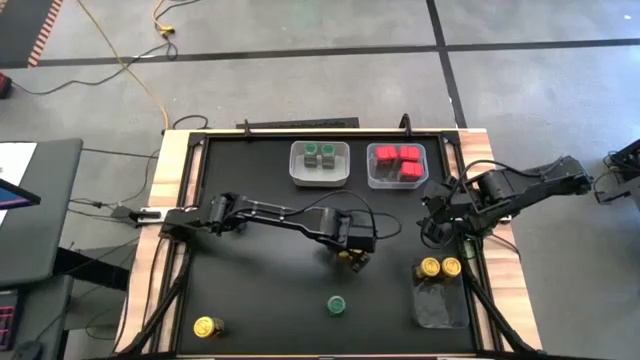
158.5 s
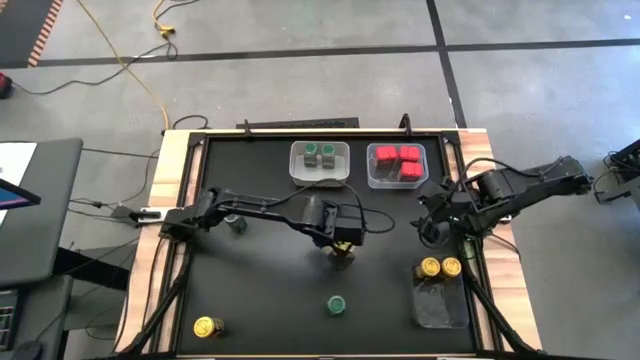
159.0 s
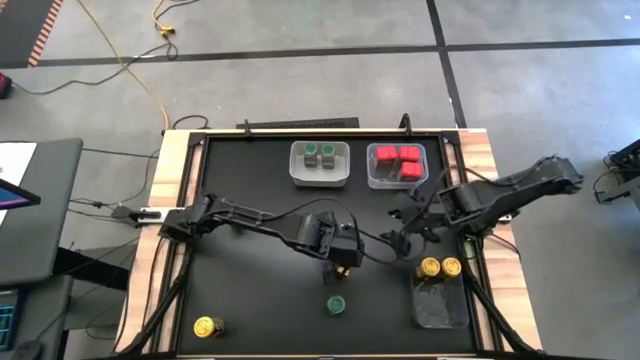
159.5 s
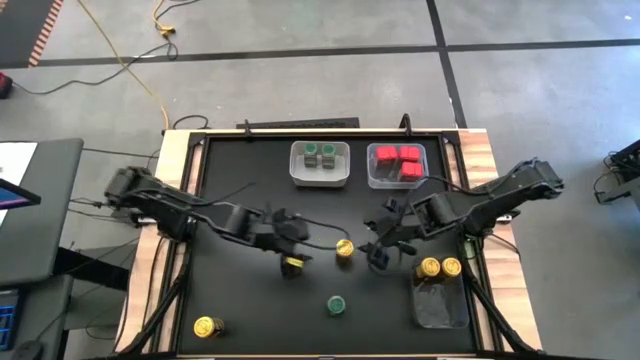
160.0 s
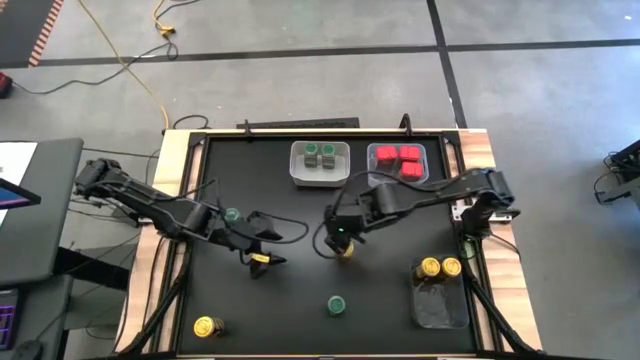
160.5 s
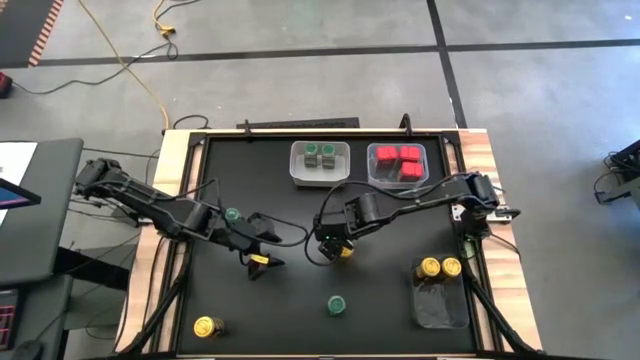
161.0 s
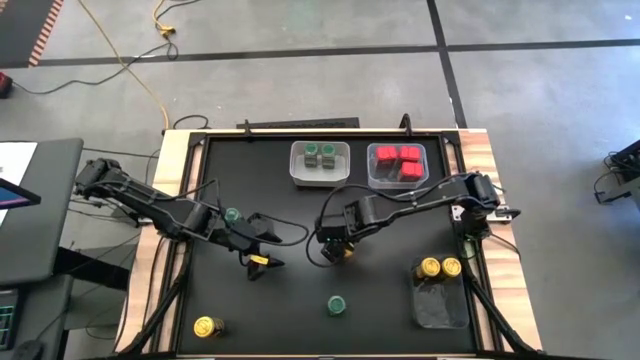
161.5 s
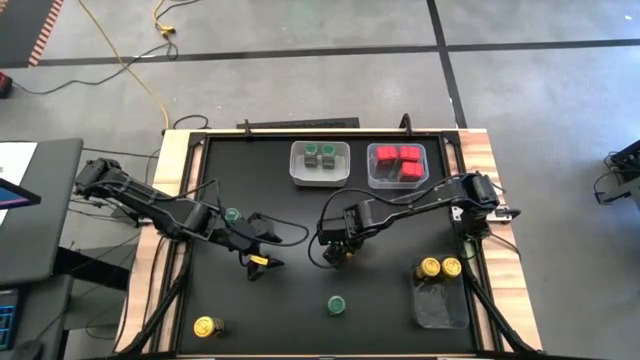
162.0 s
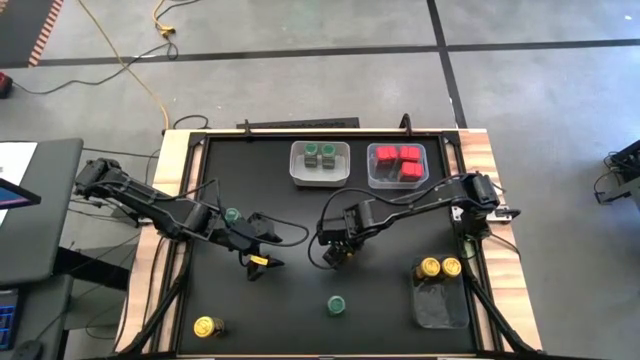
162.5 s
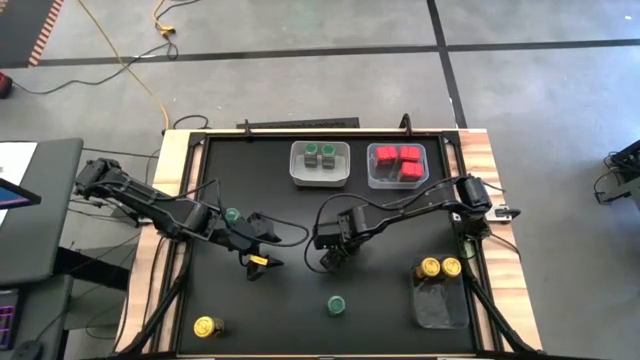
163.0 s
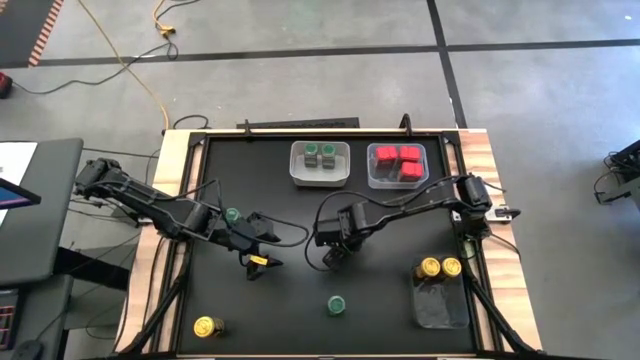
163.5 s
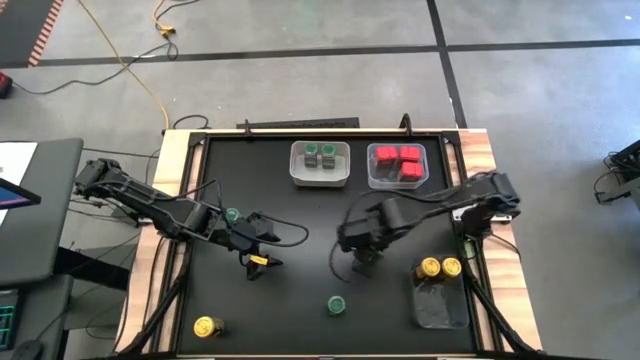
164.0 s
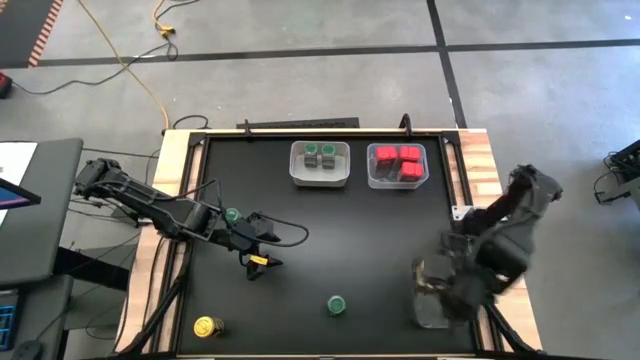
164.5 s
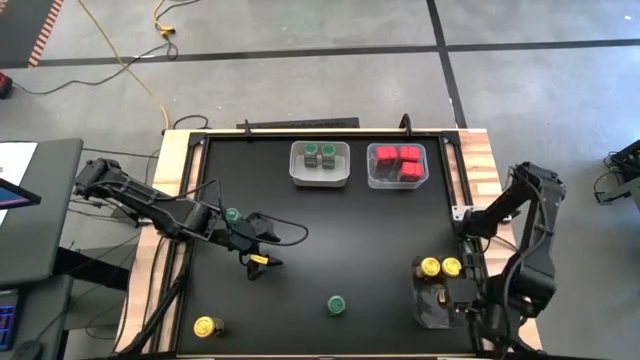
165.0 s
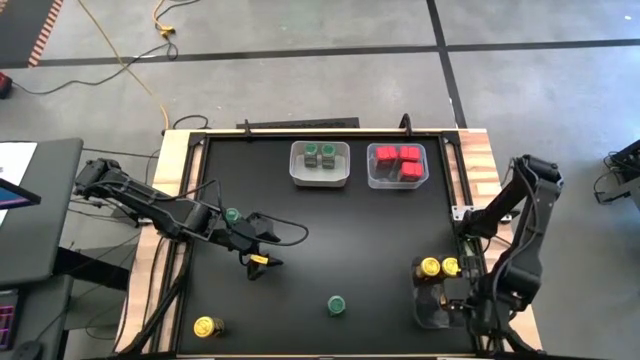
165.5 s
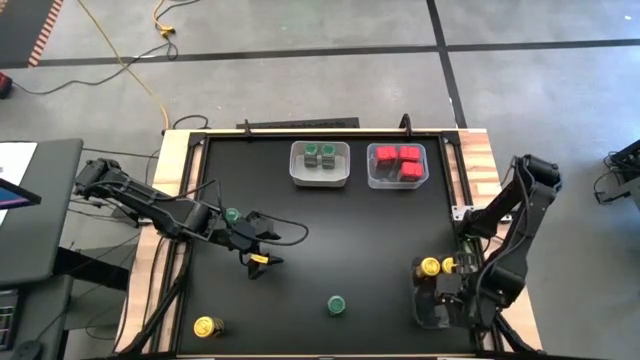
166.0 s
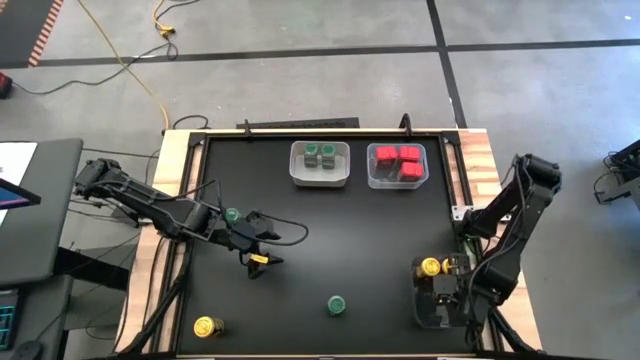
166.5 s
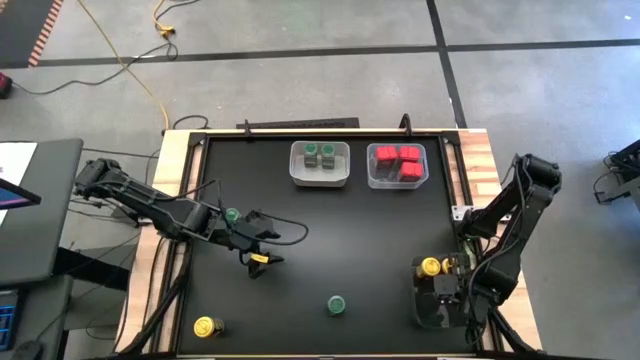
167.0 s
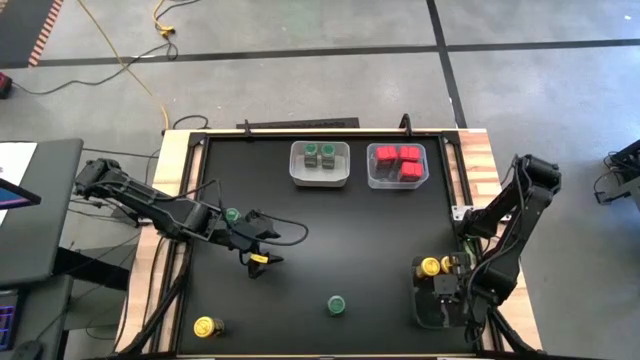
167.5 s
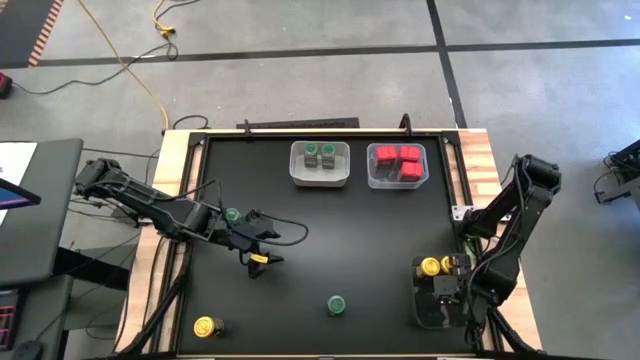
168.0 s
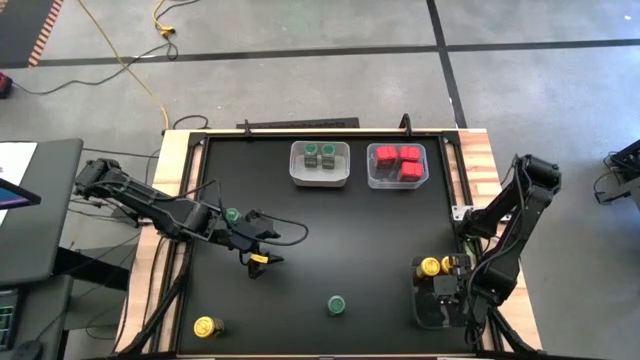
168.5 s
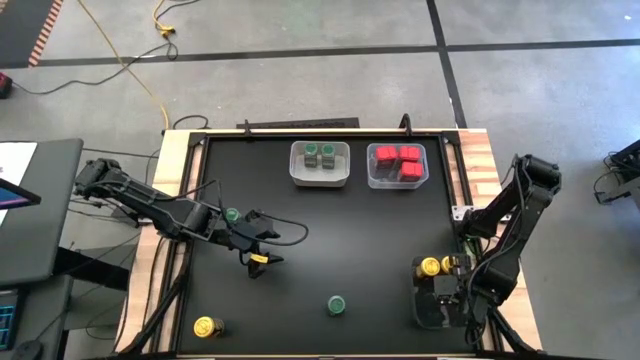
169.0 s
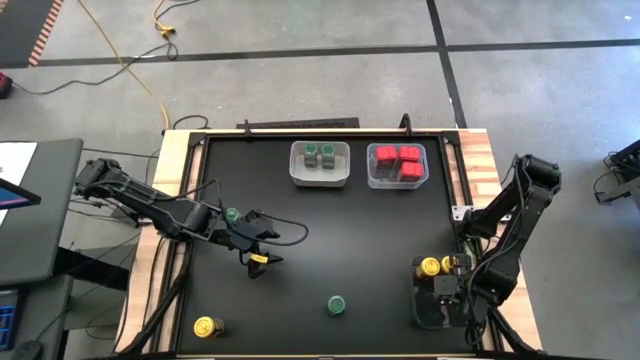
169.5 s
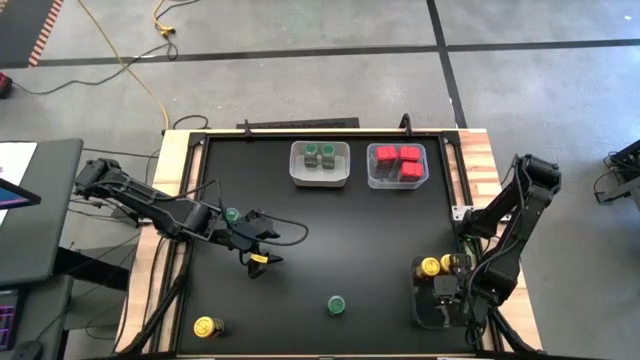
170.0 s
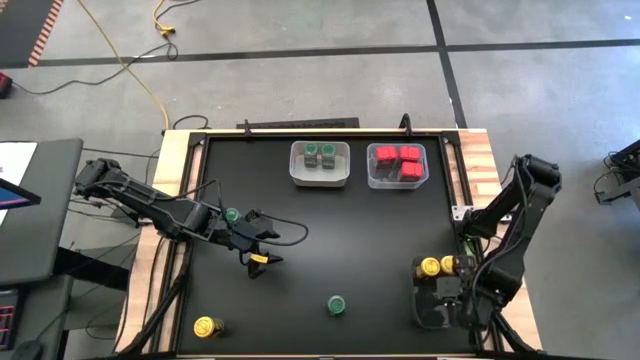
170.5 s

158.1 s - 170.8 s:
Task: Sort spices by type
Put the top yellow seasoning bottle into the black bin

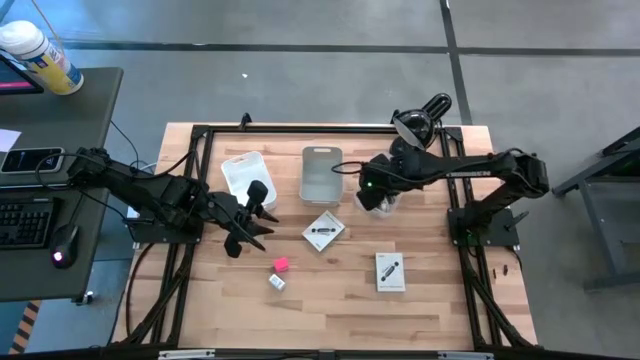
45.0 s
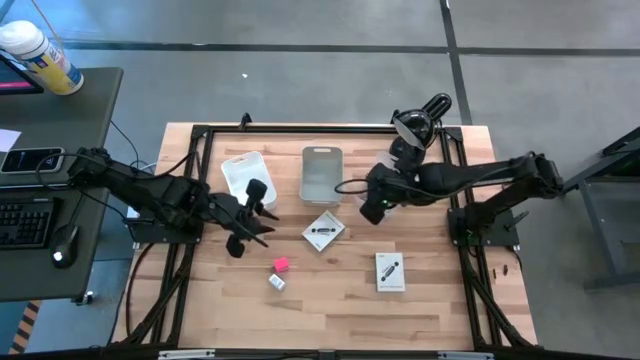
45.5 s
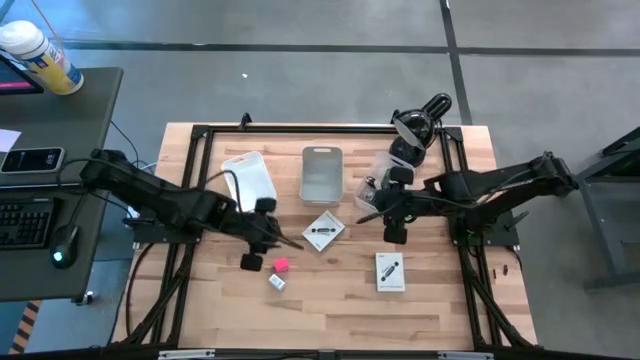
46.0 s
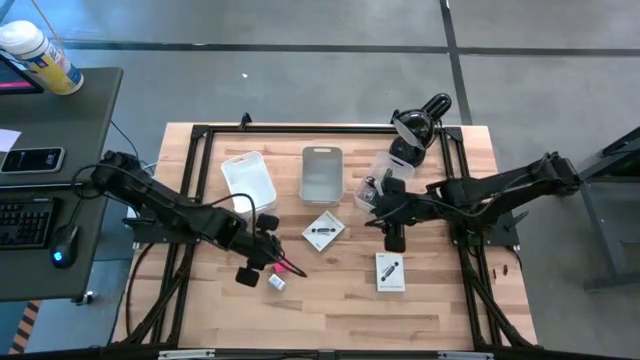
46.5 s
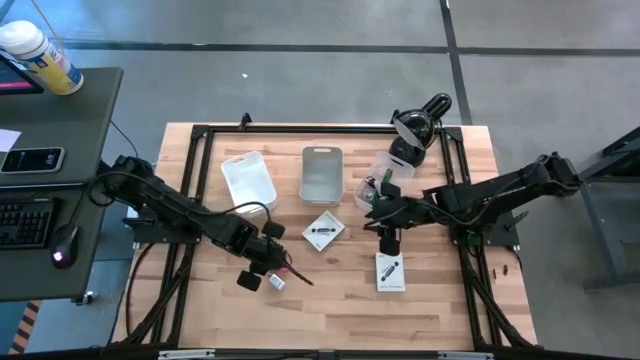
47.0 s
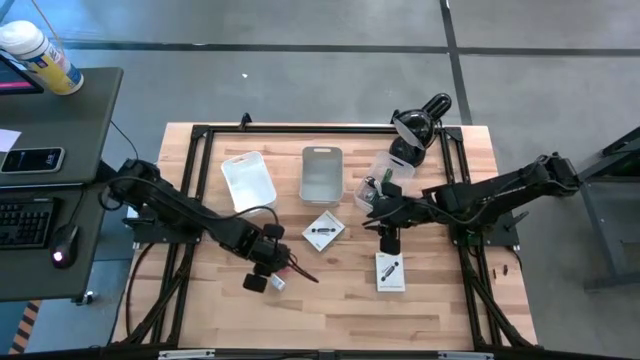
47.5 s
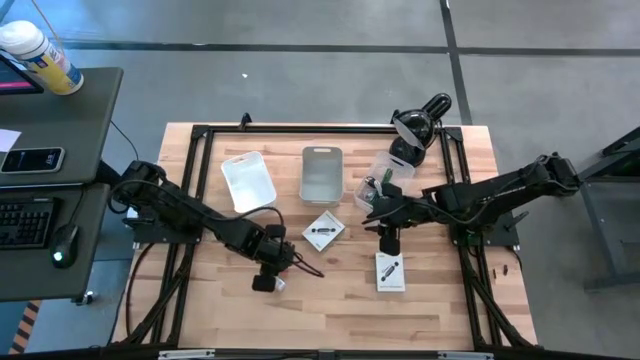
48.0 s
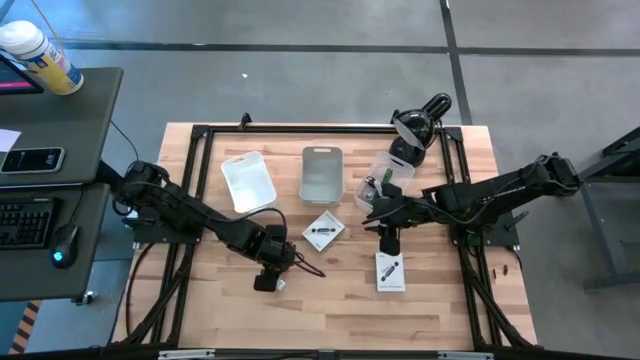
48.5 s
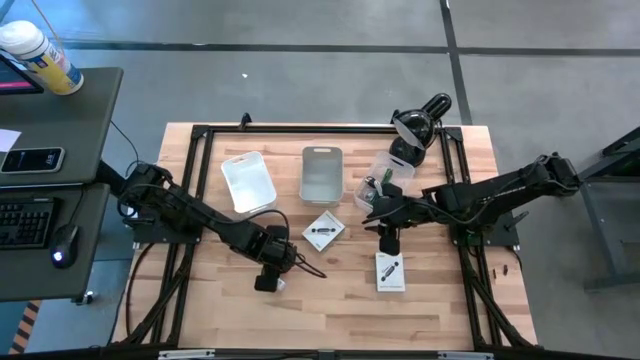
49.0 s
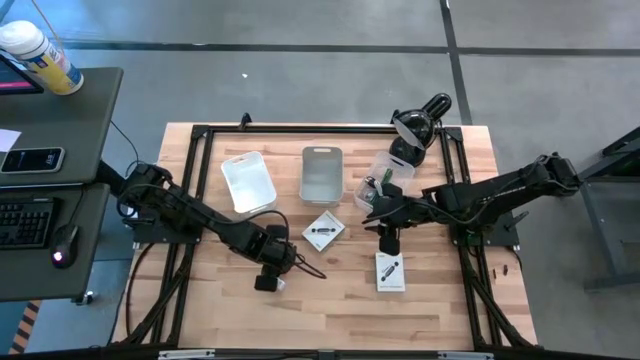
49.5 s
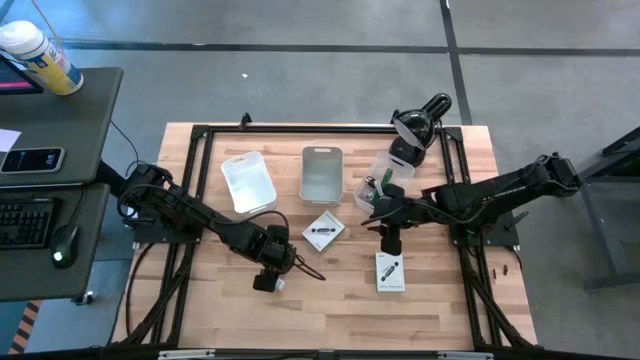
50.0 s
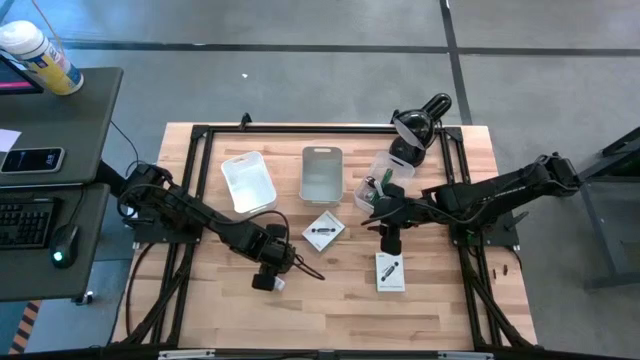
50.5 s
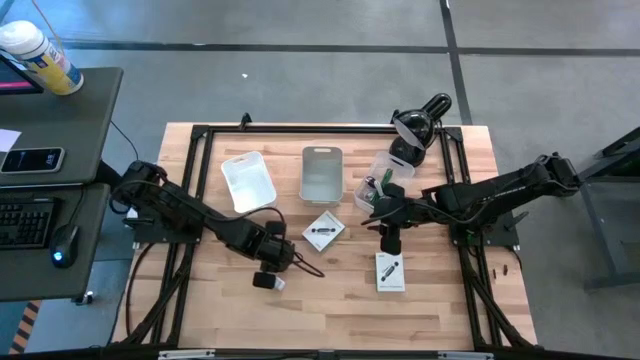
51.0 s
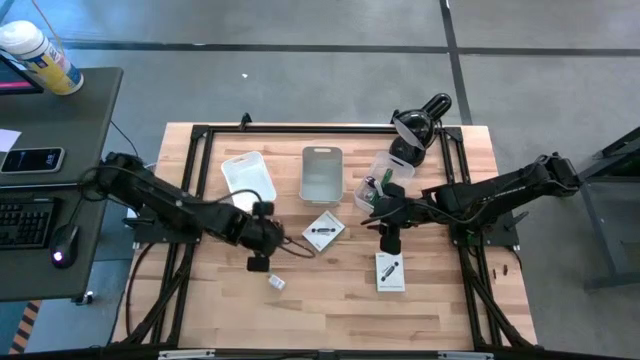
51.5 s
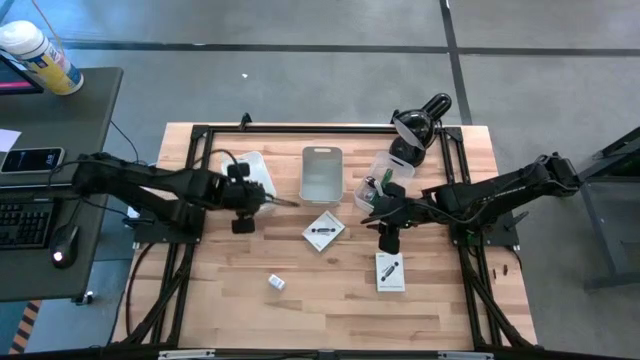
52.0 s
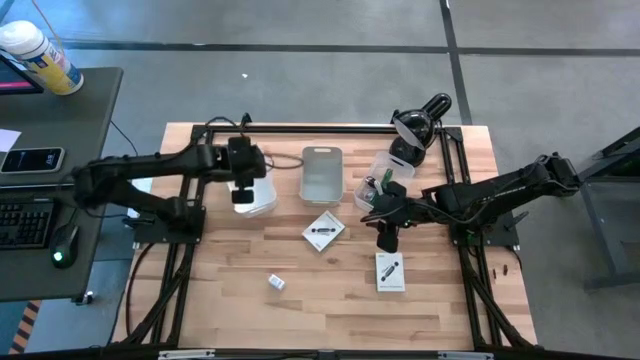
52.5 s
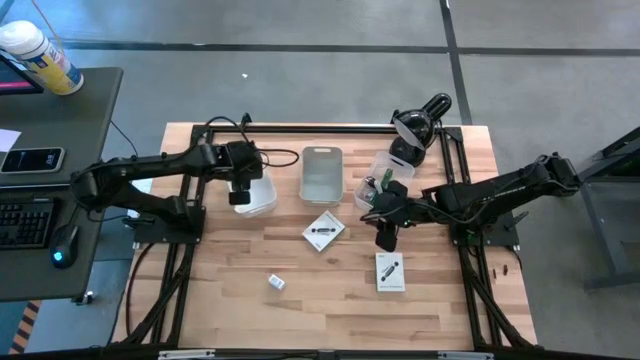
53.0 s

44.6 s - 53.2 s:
Task: Pick and place items into bin
Put the pink charger adapter into the white bin
